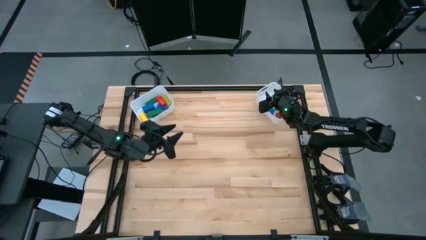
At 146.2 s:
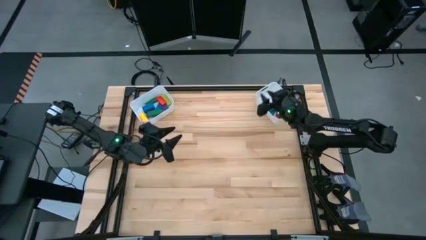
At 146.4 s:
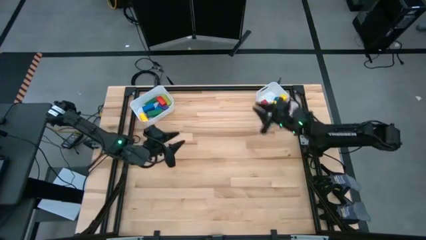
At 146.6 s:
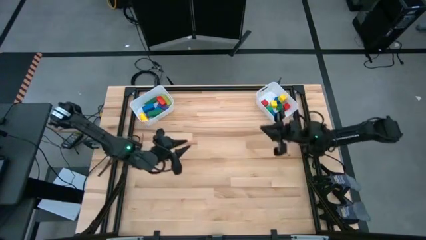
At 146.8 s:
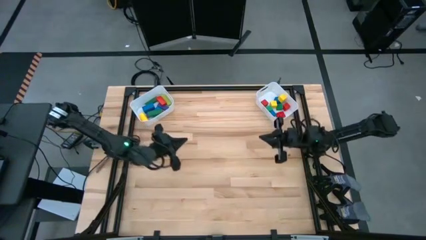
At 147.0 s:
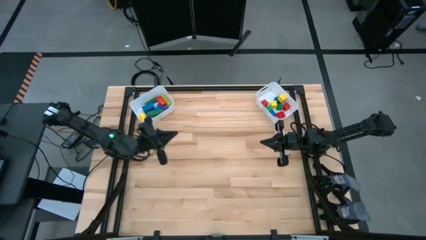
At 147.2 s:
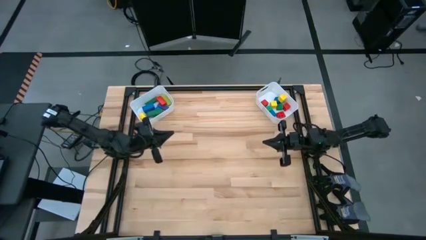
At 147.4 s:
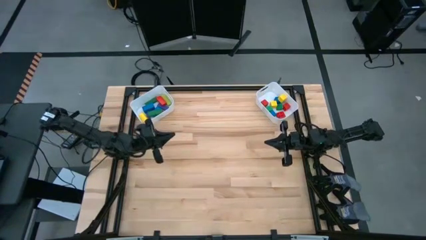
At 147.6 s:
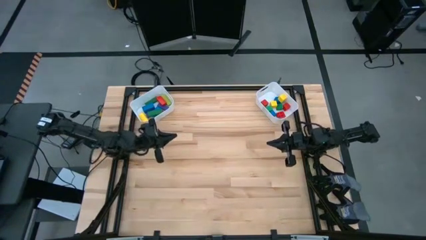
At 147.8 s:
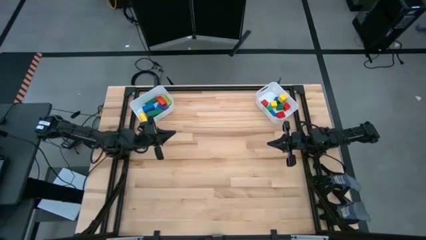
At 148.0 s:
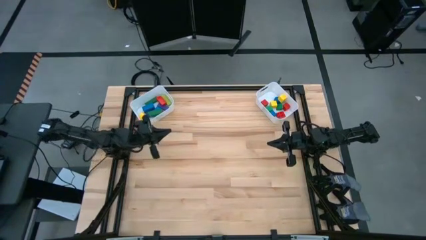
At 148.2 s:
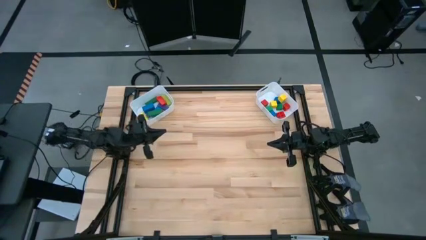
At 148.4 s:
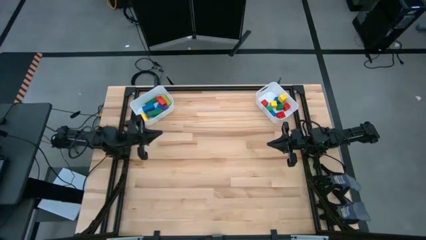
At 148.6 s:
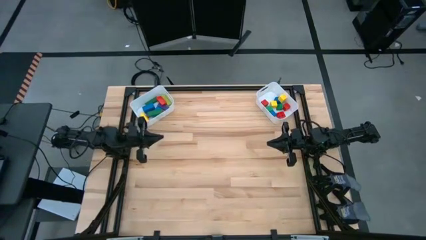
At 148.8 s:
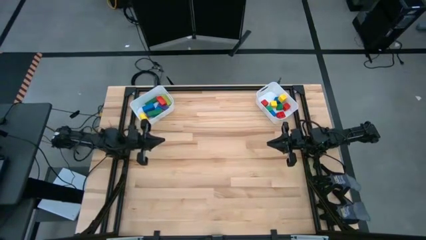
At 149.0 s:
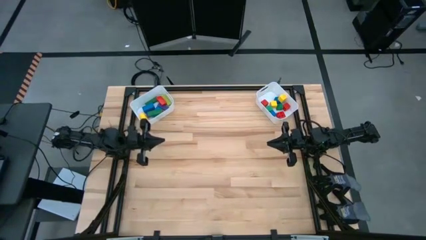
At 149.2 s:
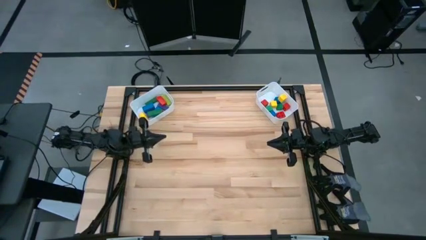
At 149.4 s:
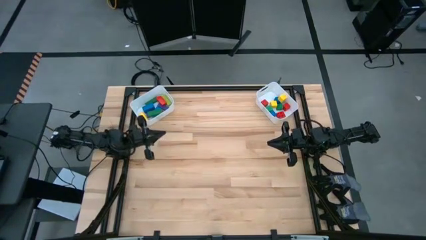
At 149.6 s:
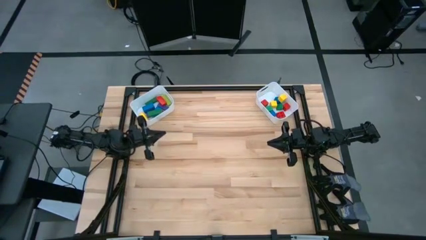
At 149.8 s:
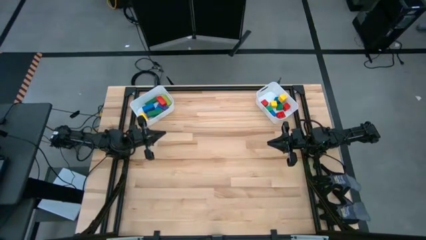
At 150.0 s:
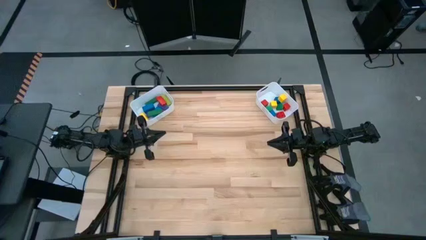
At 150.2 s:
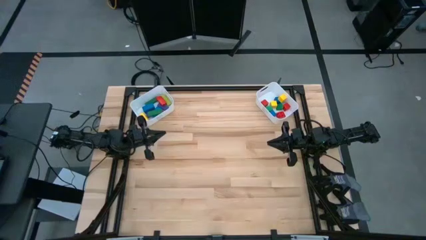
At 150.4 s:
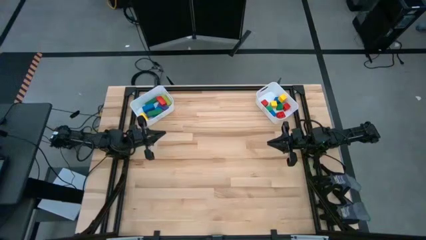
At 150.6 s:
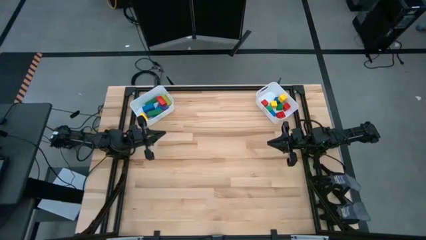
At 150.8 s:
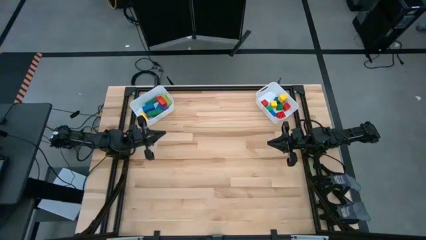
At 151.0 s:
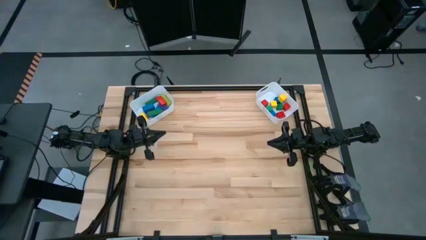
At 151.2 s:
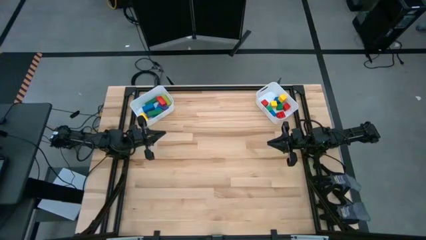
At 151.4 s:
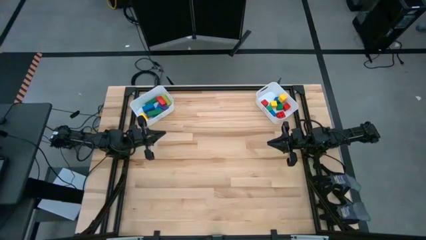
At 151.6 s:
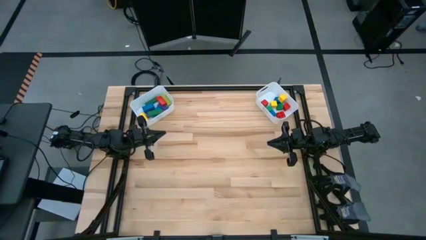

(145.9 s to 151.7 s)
Task: Sort blocks by size
Return to Home Position

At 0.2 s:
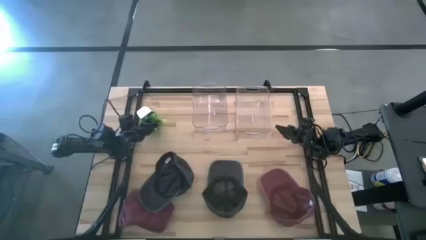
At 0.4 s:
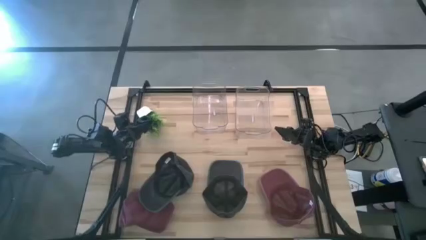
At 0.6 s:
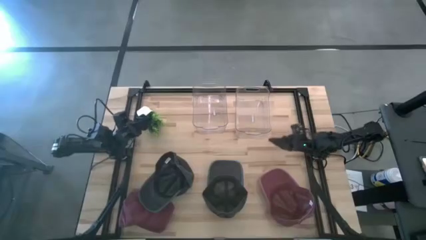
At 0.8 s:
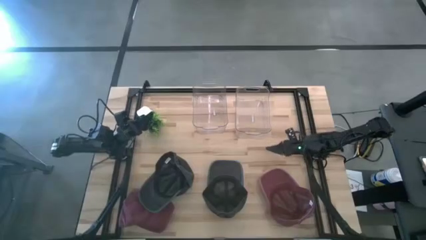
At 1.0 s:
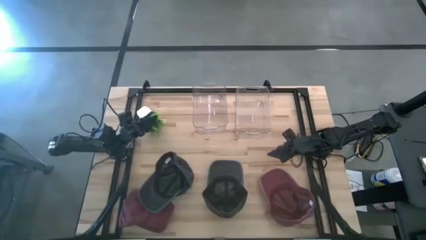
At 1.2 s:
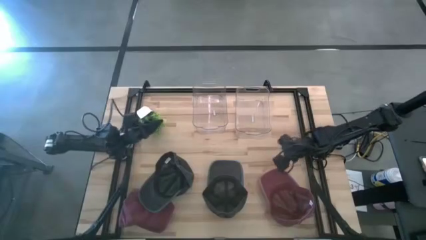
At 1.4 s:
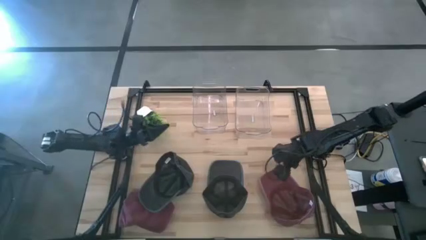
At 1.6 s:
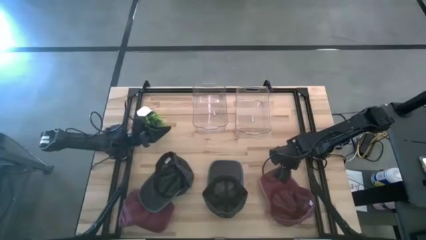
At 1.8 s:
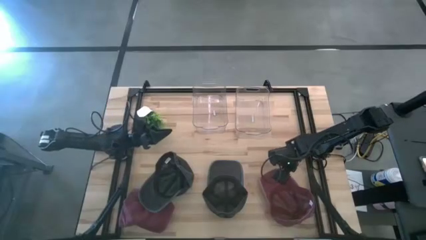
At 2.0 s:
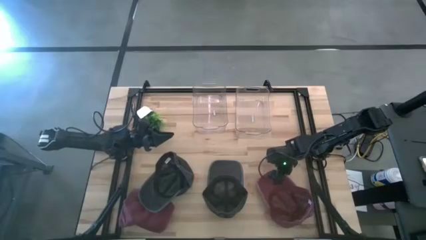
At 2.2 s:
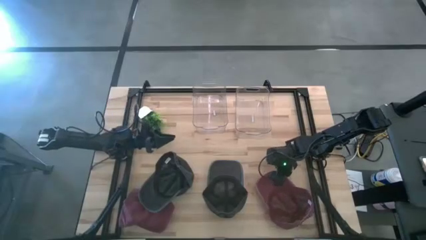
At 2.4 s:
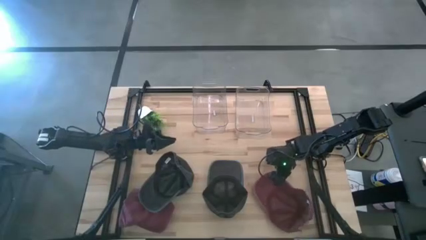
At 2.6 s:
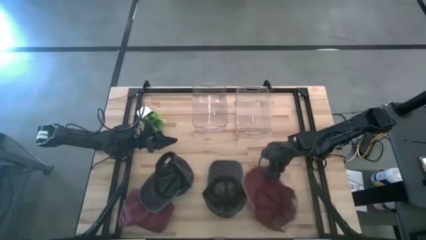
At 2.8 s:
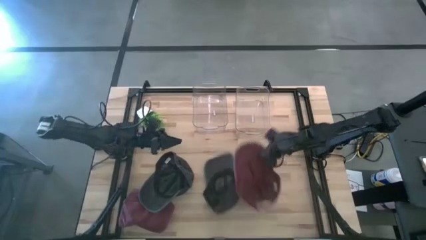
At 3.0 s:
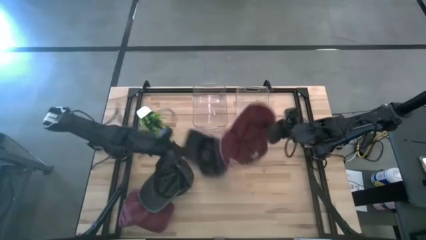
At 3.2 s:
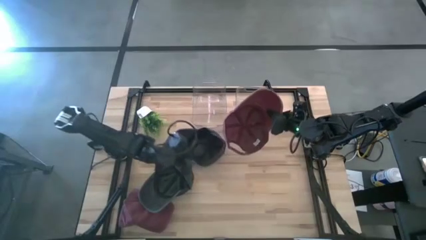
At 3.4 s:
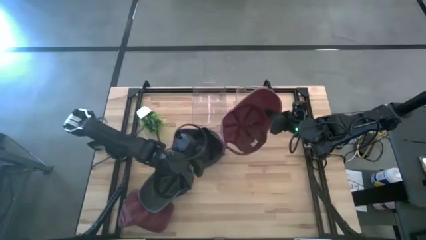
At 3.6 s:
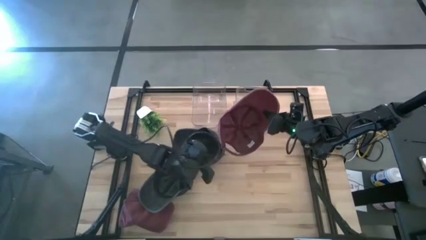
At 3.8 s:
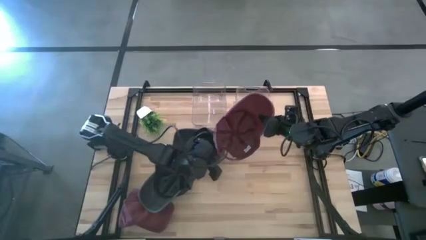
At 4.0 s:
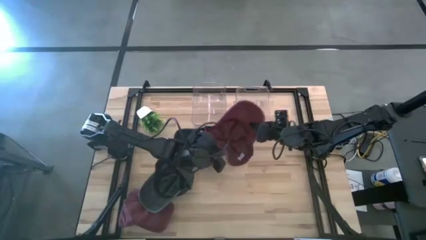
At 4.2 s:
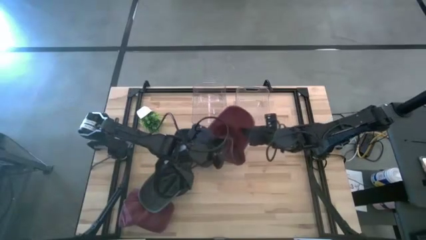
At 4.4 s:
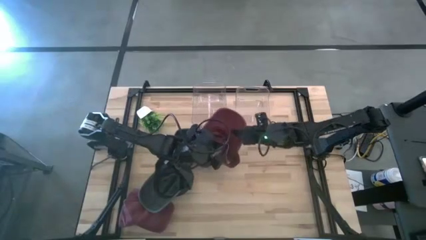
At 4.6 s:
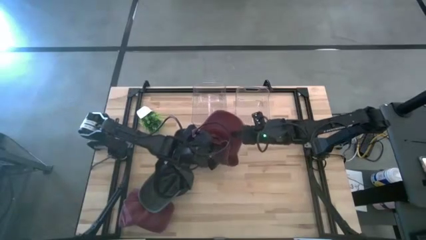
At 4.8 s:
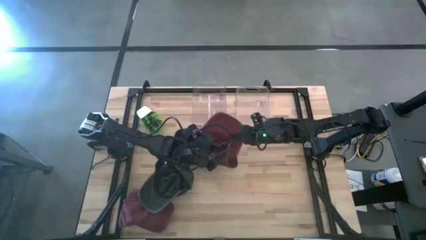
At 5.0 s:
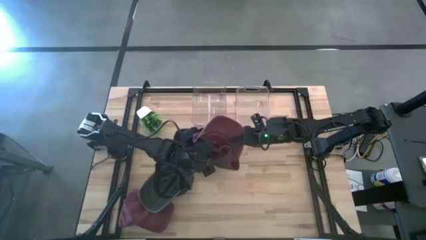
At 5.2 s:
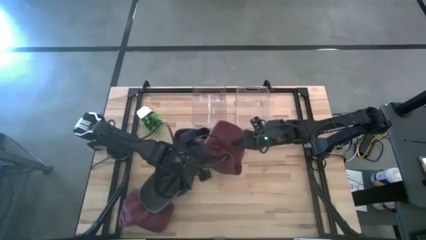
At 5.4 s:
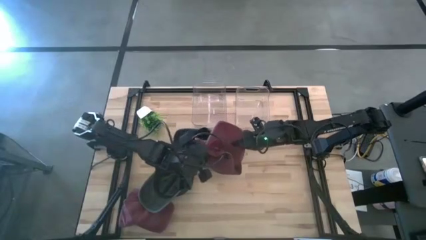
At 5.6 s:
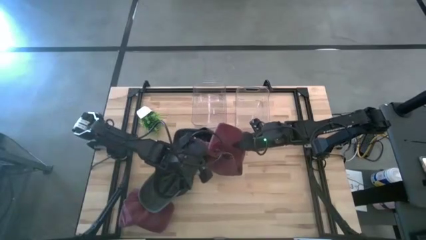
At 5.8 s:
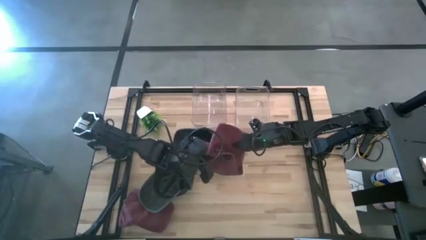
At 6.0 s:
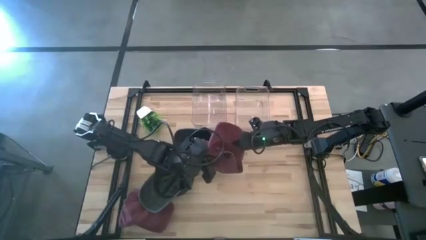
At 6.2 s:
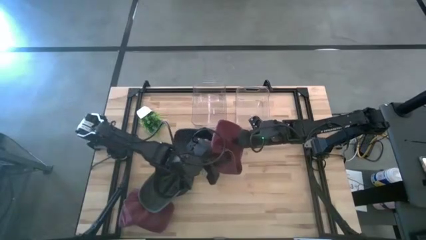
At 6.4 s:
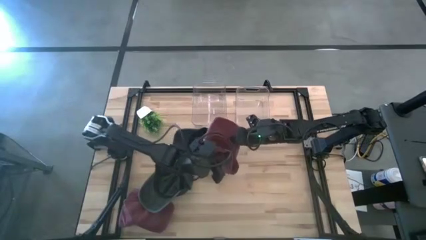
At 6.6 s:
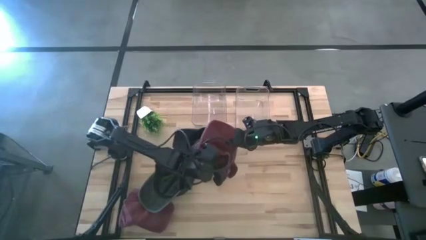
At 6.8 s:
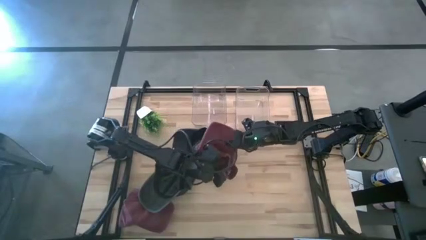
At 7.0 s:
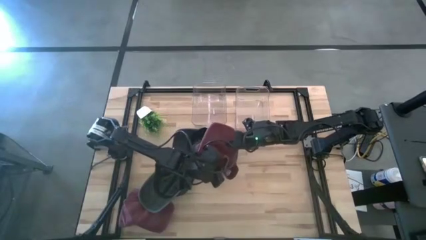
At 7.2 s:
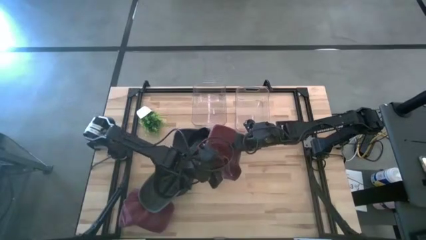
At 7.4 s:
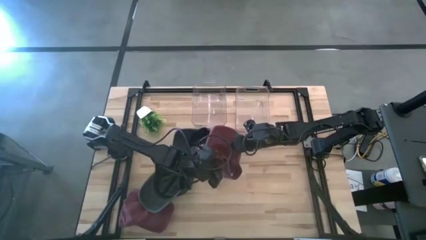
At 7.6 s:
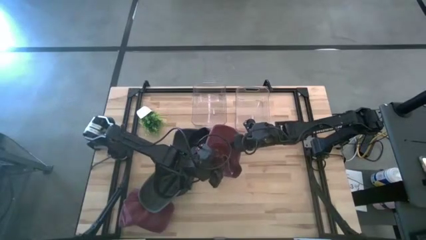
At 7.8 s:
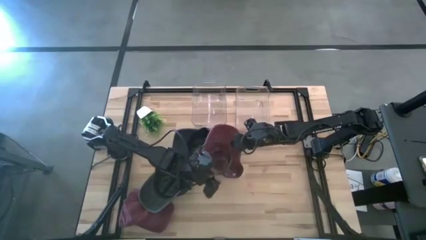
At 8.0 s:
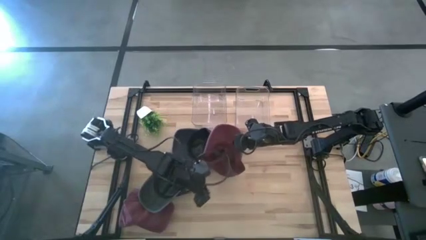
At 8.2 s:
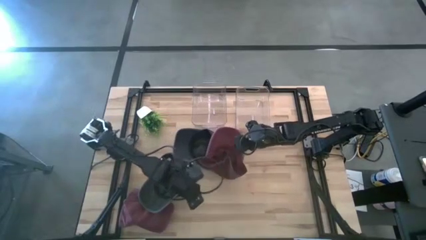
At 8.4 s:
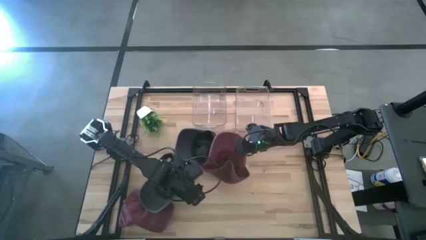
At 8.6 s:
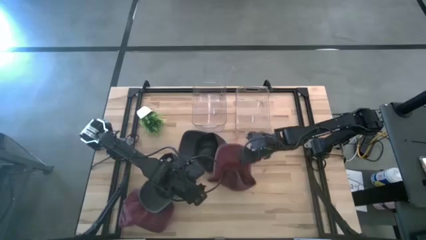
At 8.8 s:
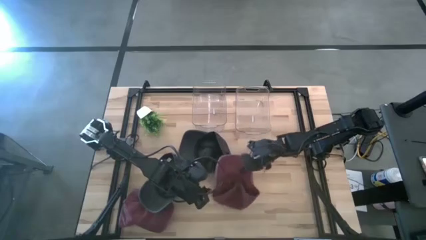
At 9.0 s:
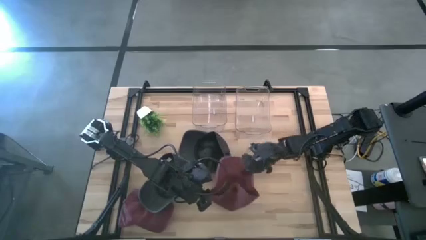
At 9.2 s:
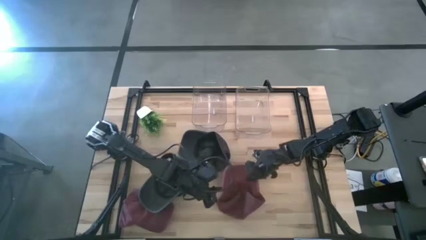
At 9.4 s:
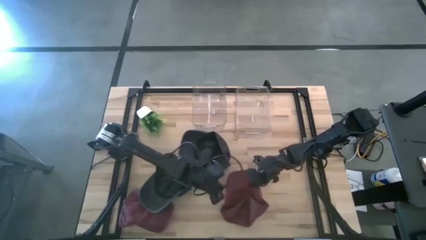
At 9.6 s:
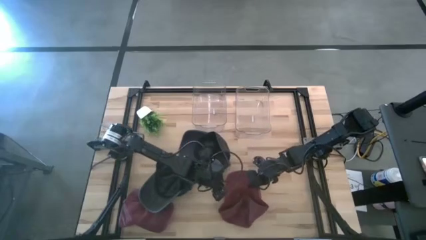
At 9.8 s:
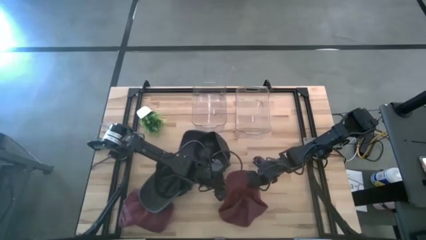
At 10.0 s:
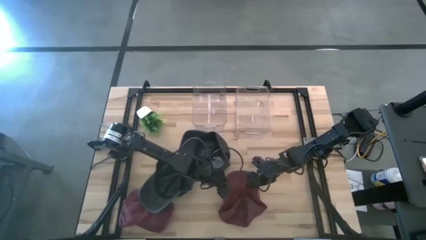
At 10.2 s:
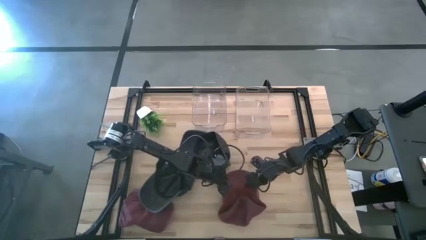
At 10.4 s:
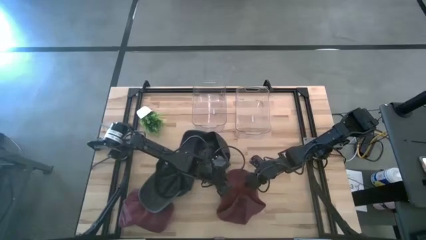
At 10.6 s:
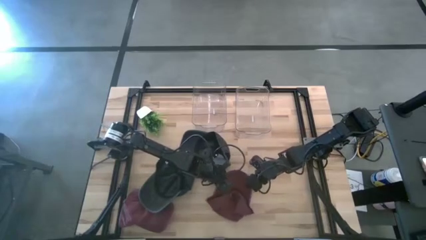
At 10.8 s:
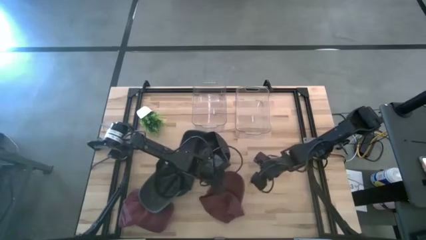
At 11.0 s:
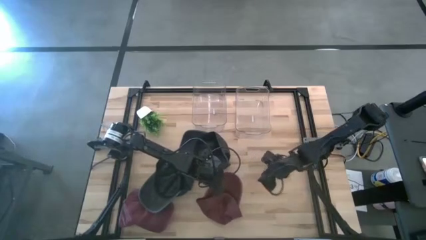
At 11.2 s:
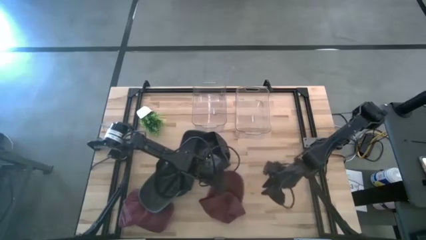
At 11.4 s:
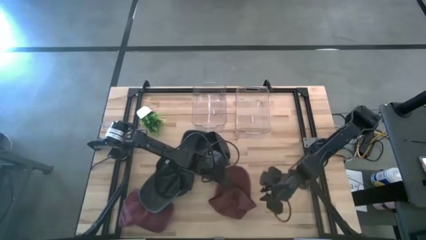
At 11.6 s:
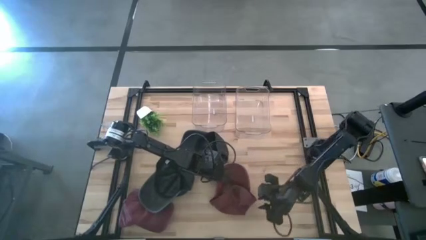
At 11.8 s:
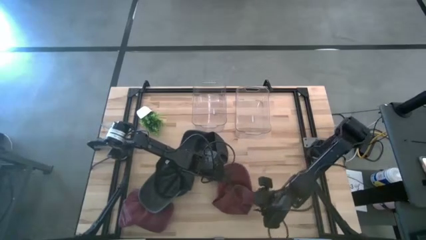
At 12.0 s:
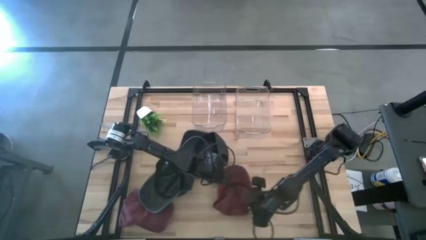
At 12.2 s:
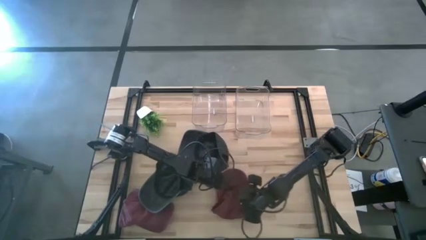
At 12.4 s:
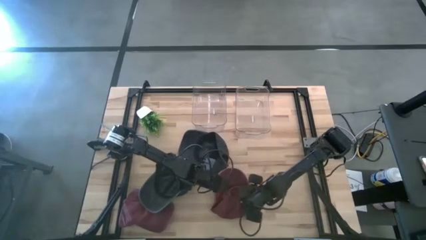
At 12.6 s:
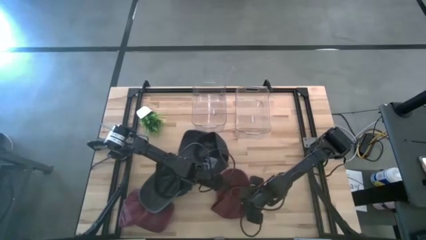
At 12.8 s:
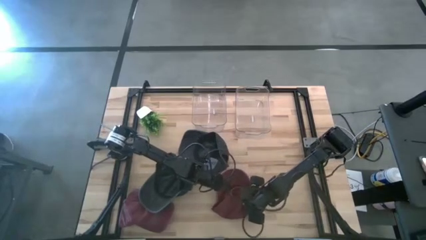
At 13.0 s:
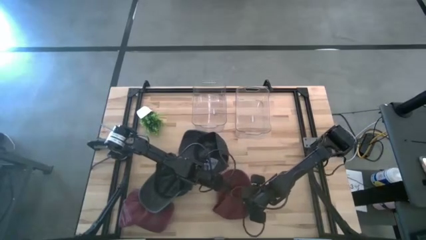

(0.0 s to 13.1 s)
Task: Pick & Place hat
Put the right red cap into the right transparent bin
